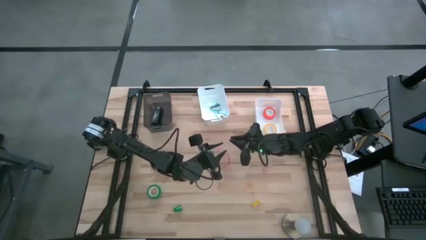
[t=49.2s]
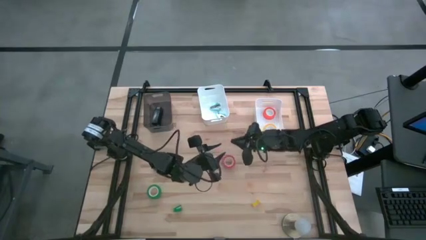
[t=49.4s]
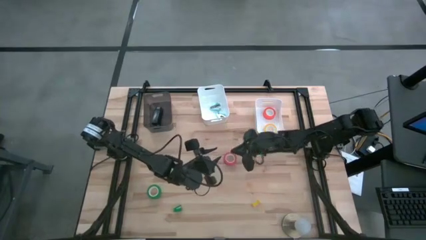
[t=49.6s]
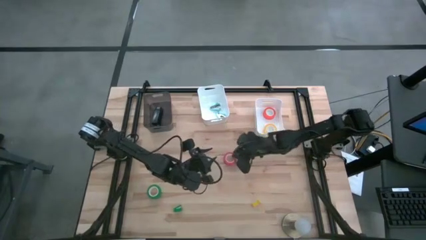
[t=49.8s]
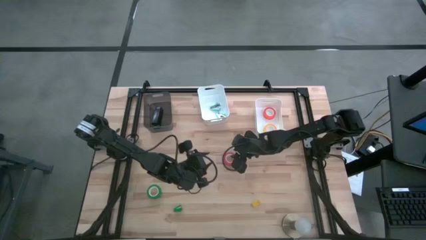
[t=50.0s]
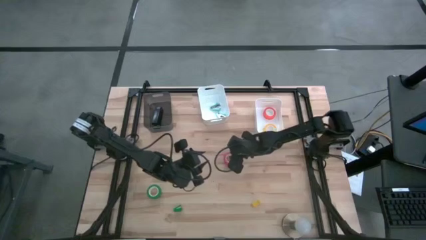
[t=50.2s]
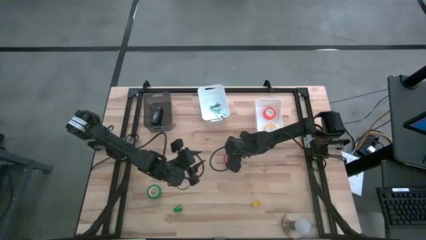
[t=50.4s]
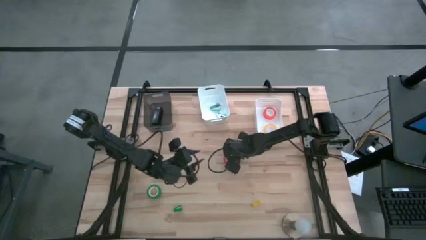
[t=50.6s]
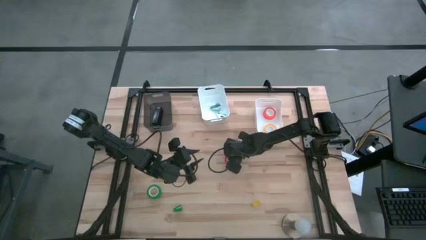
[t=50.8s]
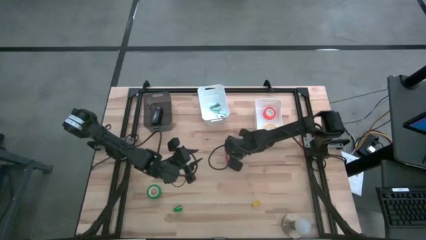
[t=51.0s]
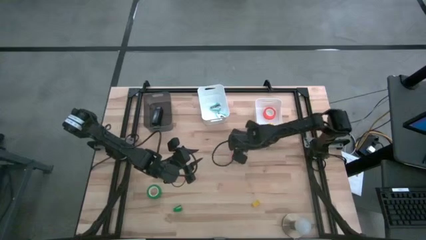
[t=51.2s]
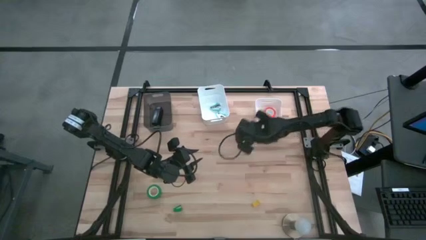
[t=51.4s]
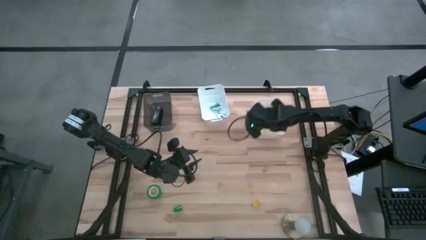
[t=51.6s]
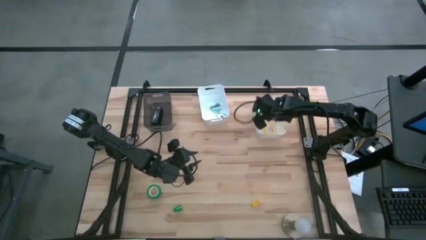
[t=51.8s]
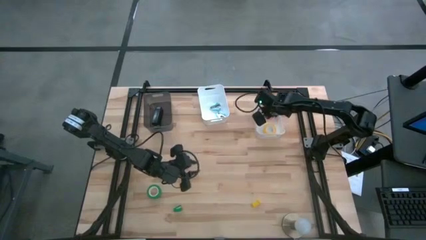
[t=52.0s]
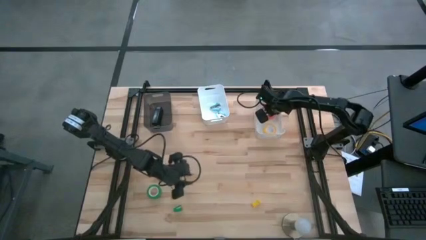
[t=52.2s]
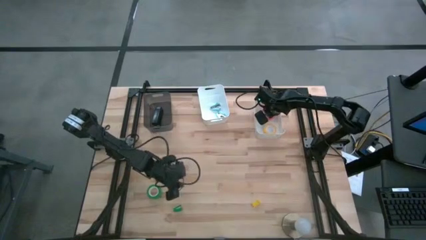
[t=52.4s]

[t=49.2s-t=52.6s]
Task: Pick and place Stapler, Stapler remover, tape
Put the red tape into the right white bin

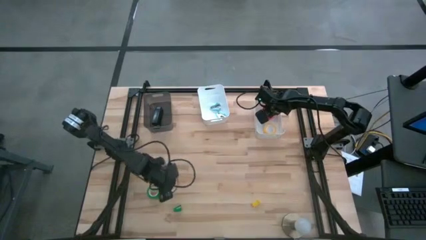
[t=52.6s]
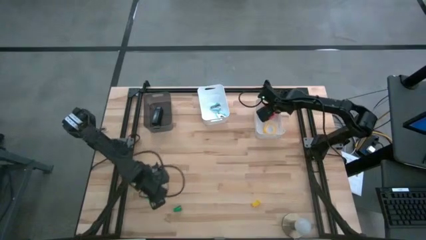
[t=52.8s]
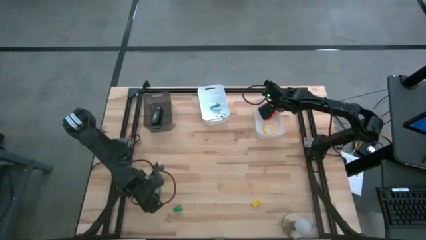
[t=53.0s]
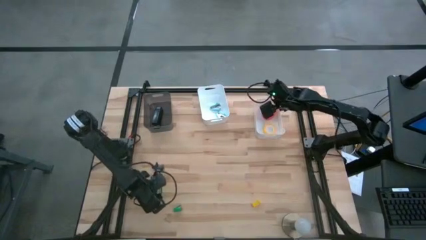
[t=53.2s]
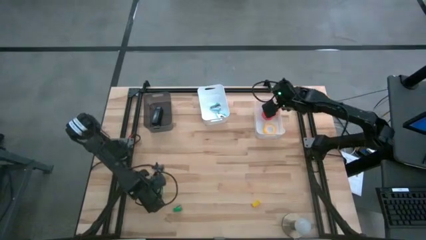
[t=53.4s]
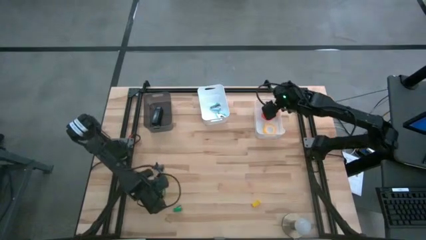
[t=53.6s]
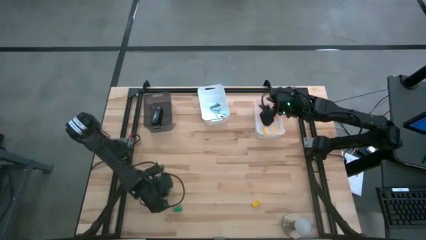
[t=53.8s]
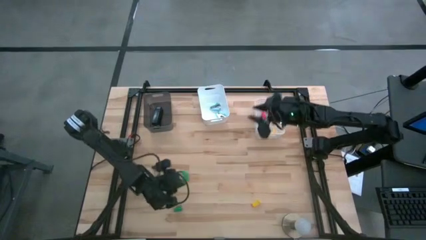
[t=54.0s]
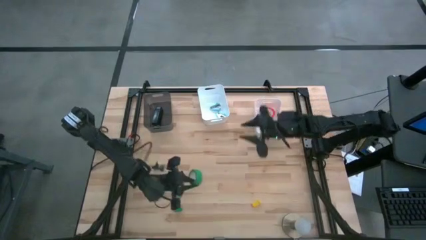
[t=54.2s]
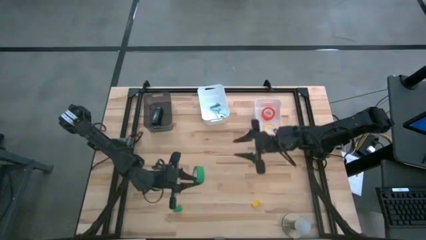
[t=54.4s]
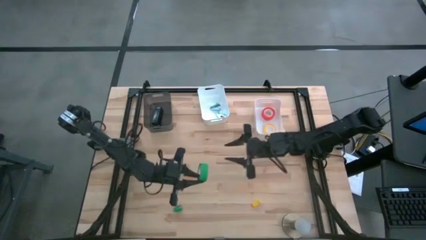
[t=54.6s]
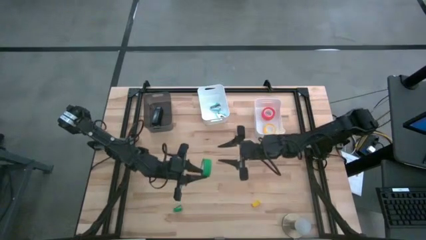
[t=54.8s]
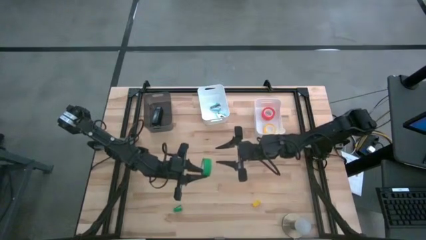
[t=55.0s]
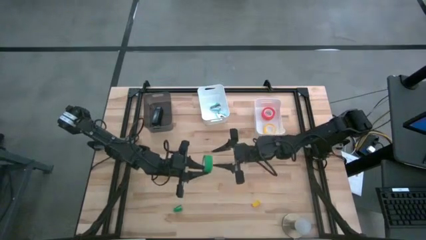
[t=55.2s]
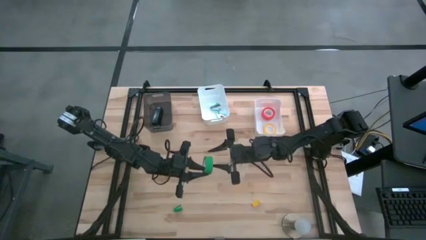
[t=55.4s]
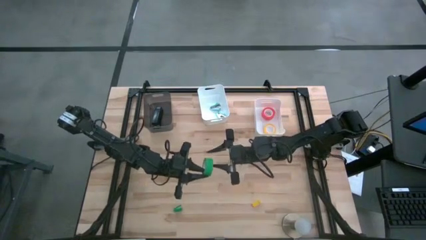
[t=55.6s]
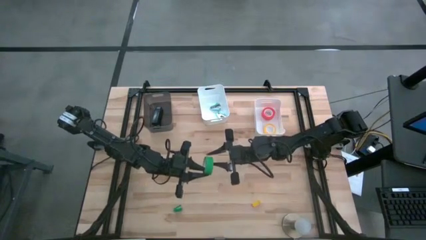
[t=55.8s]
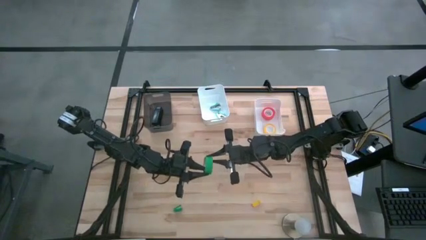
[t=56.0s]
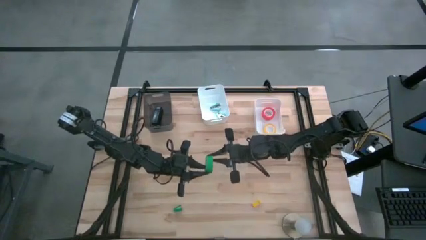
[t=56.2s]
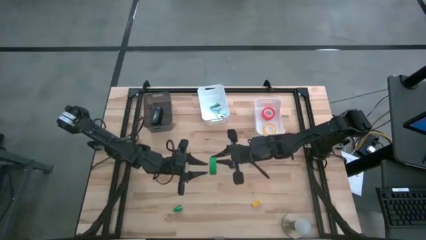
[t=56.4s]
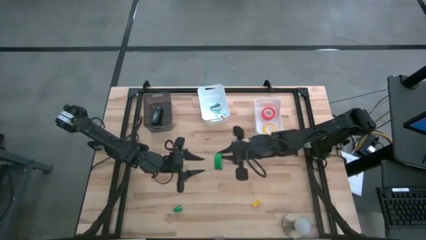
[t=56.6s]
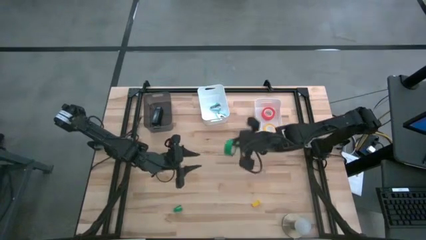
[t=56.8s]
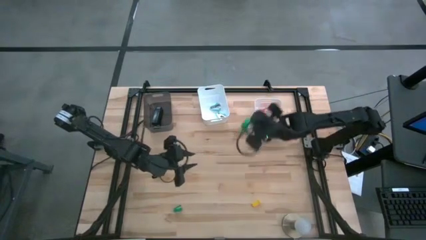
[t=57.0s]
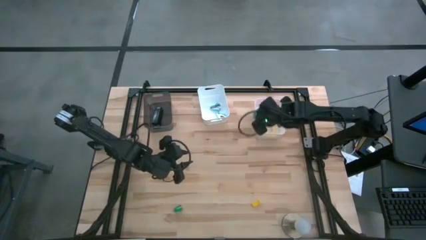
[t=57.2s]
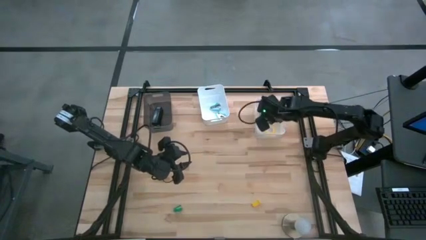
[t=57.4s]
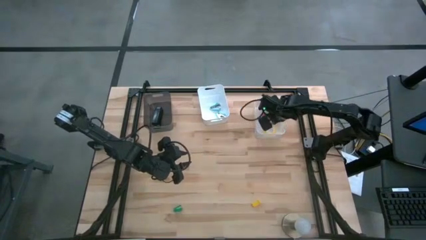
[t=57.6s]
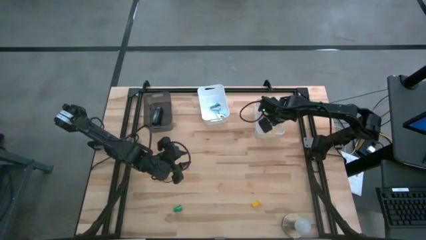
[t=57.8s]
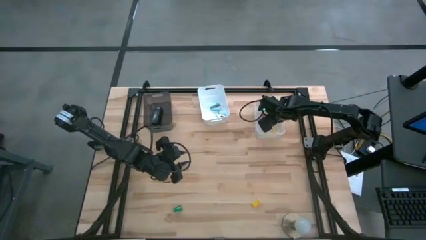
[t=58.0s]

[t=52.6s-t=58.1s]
Put the green tape into the right white bin

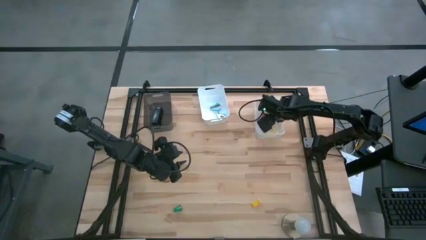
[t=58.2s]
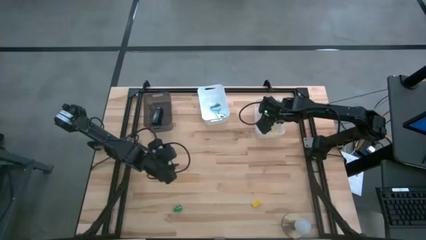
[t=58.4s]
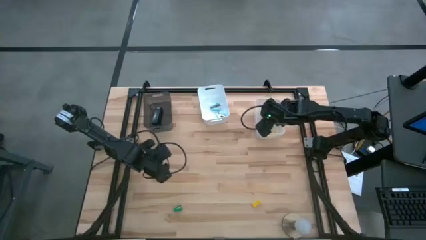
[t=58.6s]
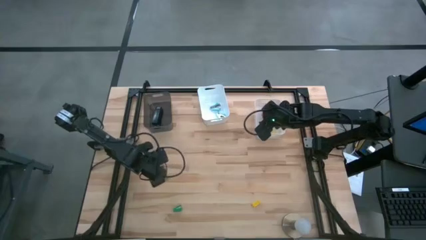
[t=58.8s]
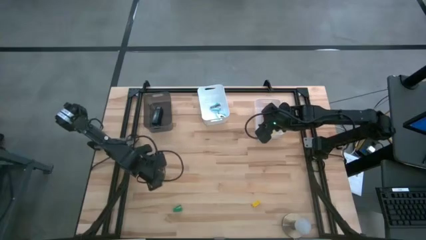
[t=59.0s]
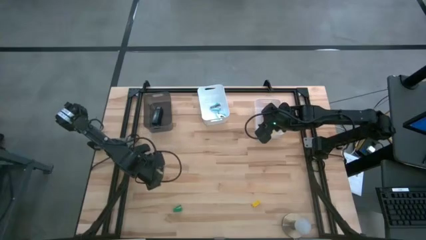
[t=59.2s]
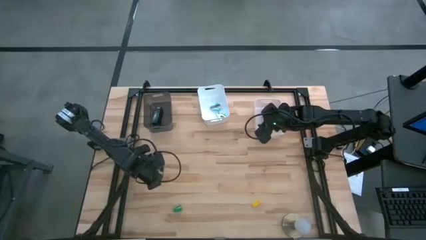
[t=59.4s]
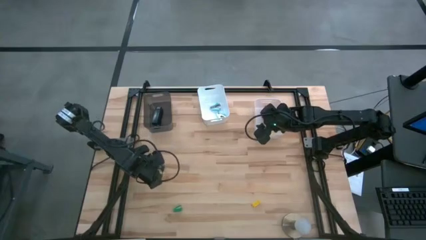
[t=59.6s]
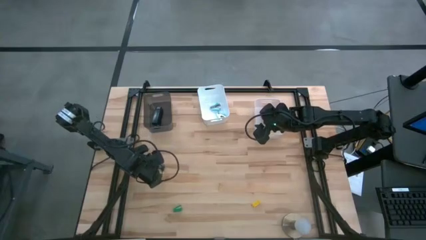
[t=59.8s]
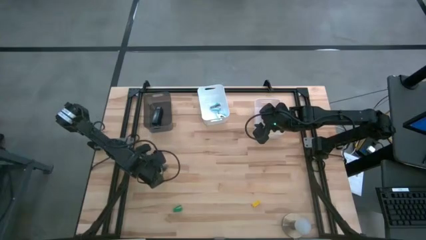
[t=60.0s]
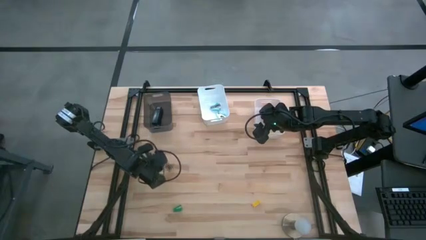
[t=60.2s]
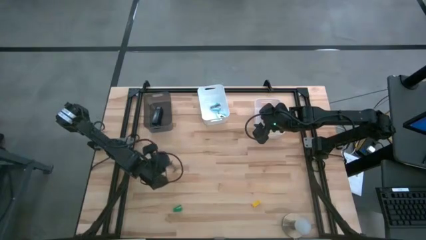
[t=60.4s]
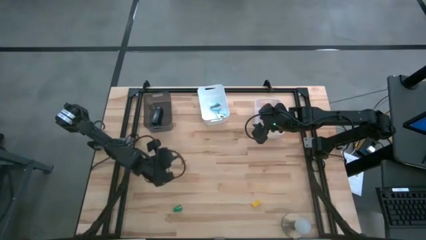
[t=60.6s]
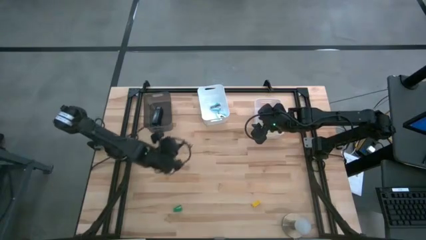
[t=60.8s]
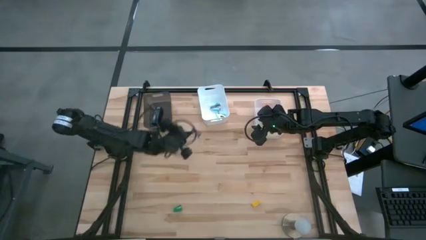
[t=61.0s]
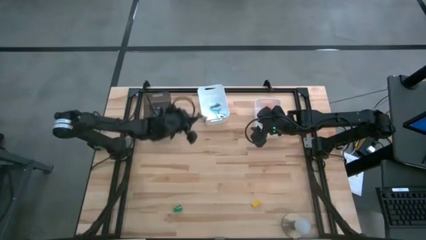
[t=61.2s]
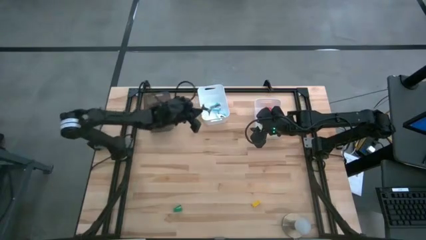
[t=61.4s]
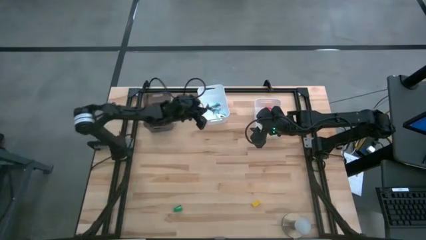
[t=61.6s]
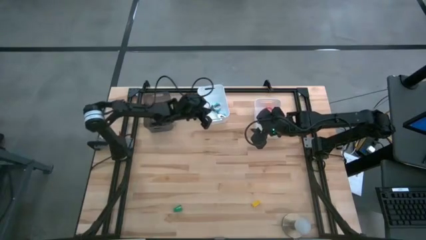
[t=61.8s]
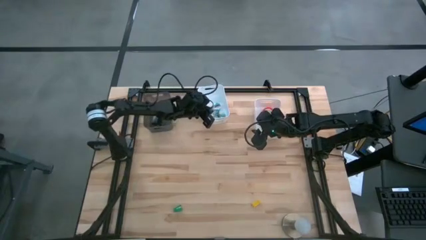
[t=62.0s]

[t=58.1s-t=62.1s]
Put the black staple remover into the left white bin

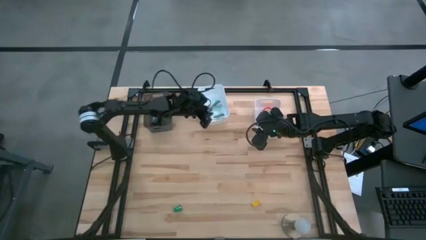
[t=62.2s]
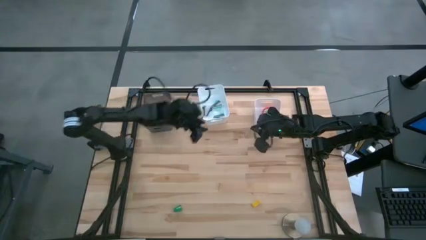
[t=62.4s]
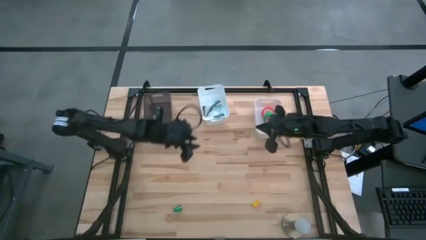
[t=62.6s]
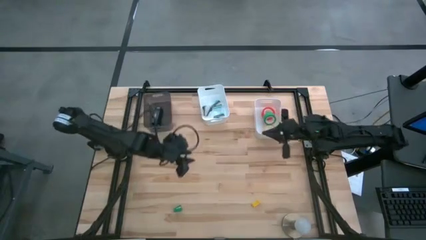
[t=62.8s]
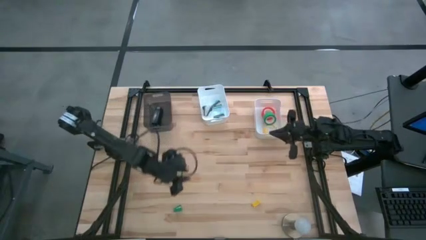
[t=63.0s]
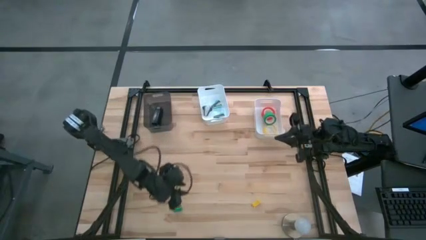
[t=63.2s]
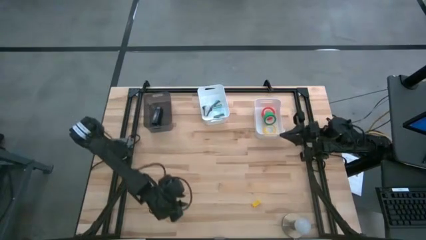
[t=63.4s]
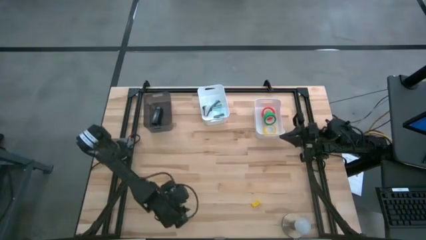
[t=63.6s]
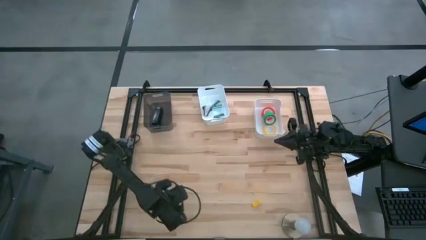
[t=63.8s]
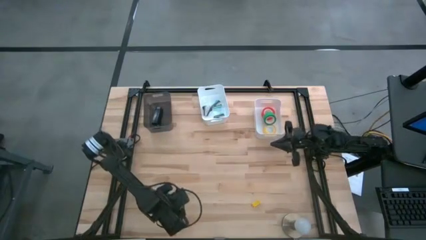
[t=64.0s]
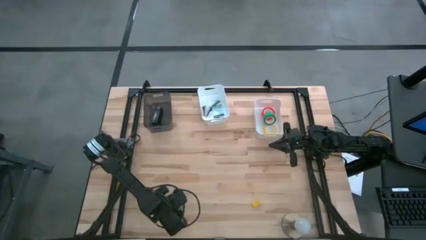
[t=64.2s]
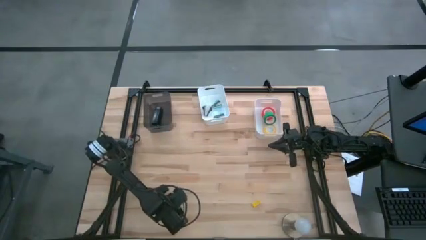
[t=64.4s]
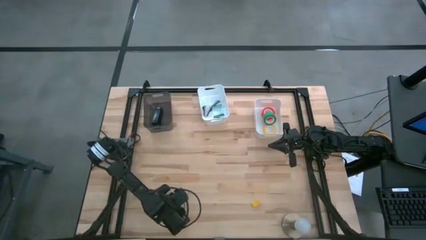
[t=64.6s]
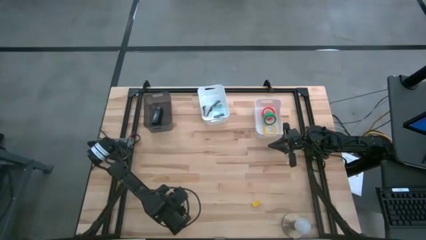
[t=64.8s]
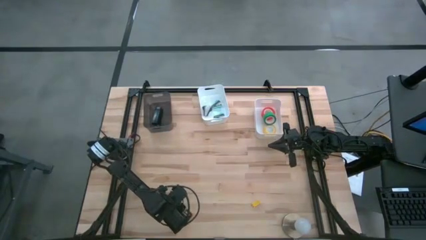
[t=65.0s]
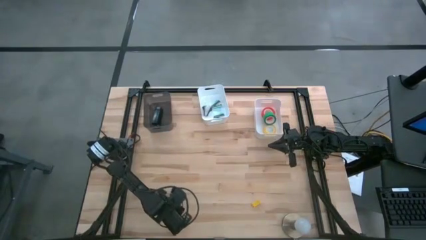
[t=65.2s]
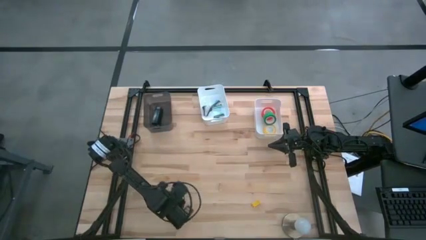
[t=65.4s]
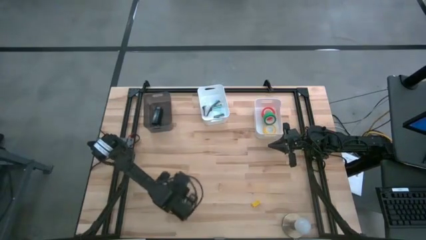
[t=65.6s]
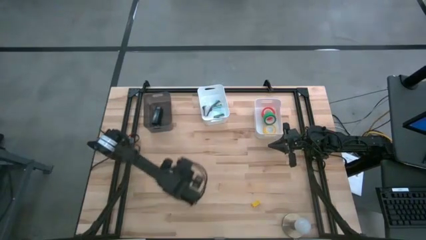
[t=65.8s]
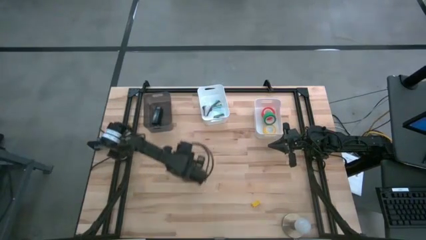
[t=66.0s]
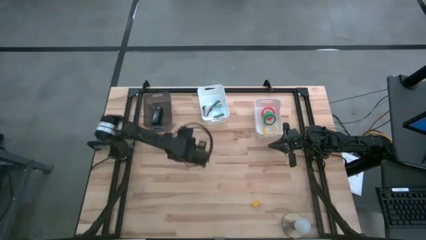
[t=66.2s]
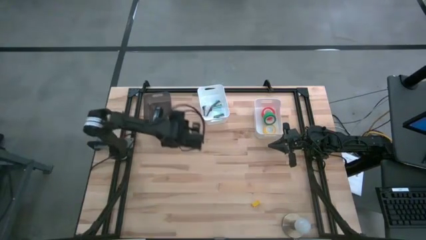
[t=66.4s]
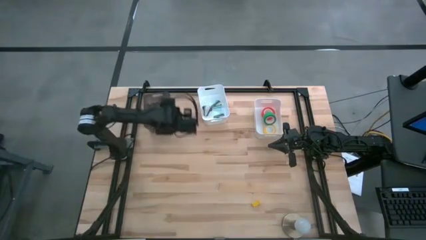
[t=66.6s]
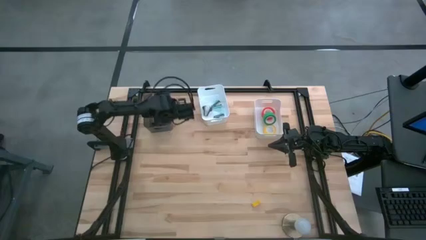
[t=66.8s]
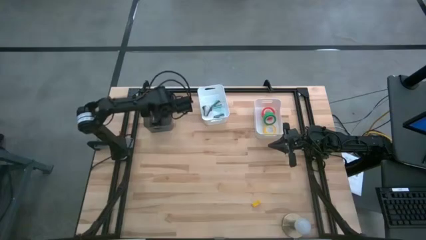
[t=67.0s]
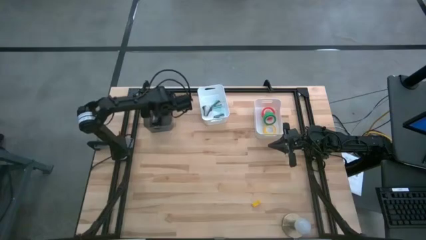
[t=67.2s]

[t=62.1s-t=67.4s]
Put the green stapler into the black bin
